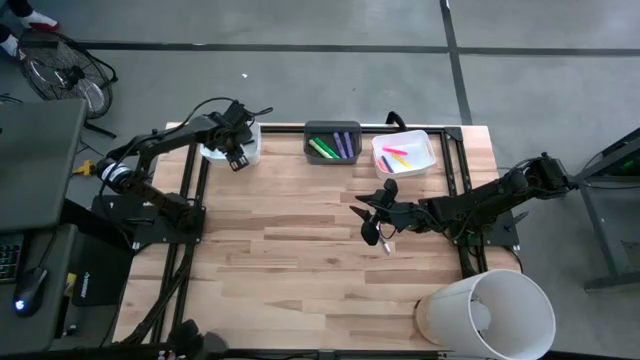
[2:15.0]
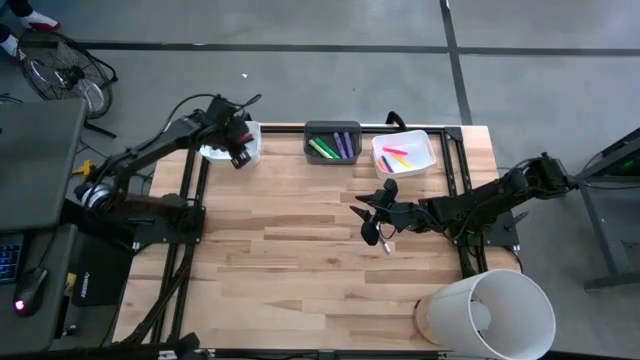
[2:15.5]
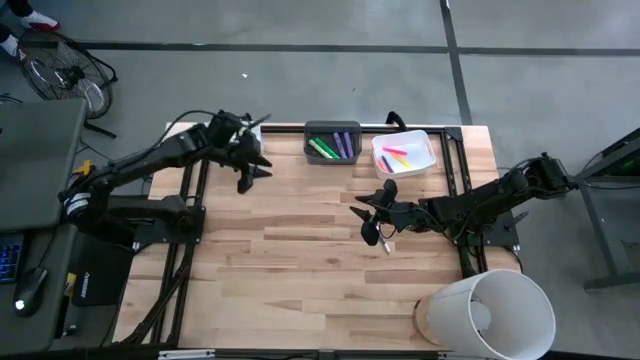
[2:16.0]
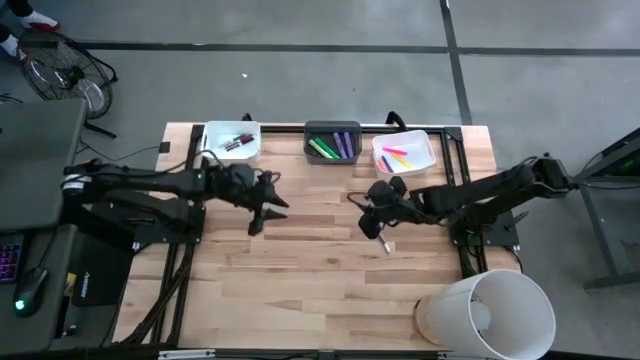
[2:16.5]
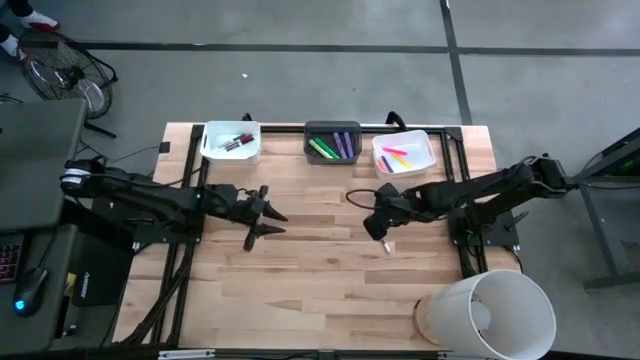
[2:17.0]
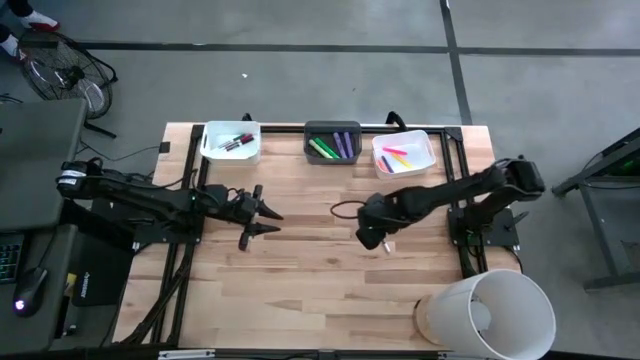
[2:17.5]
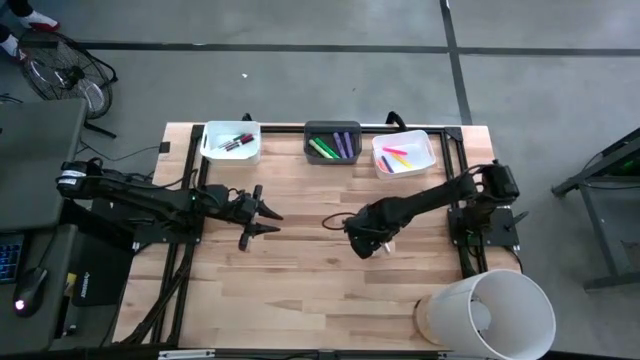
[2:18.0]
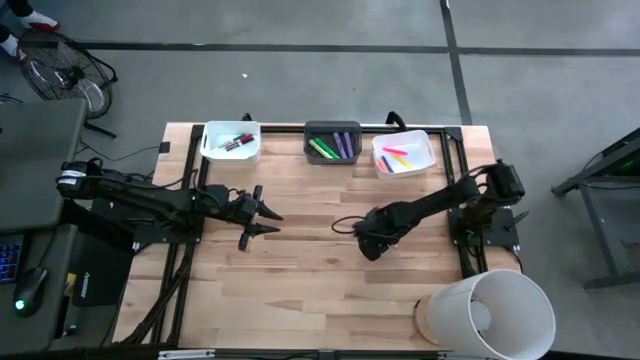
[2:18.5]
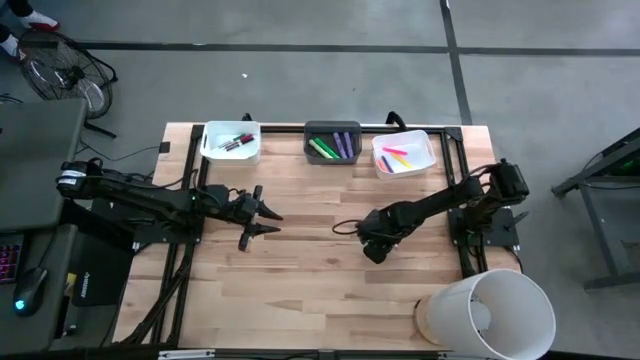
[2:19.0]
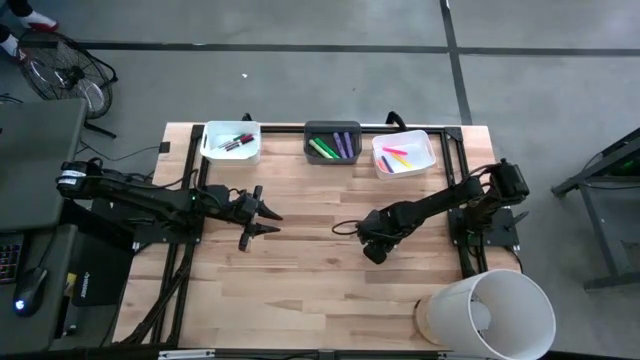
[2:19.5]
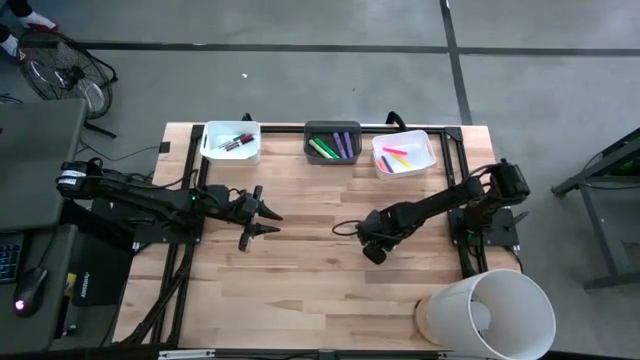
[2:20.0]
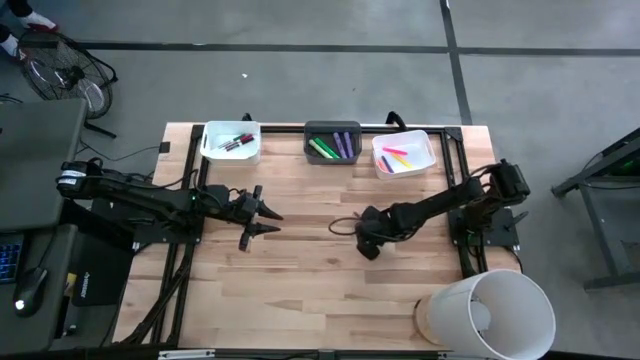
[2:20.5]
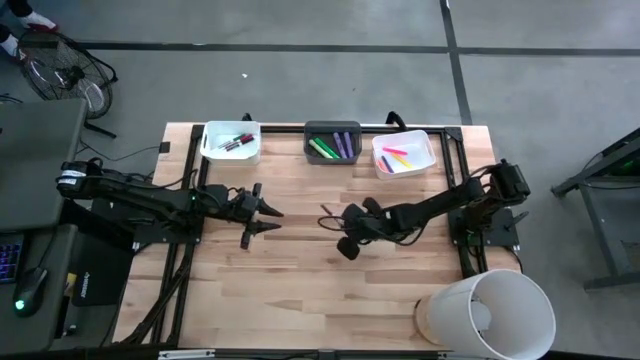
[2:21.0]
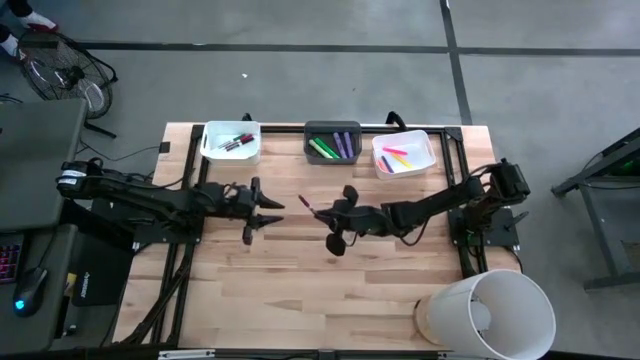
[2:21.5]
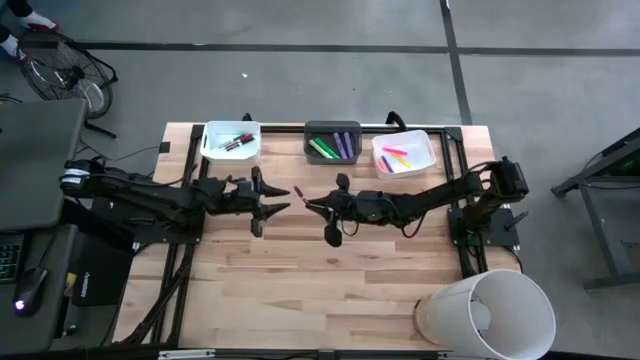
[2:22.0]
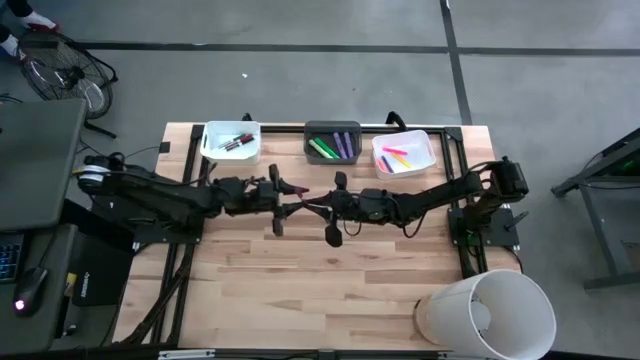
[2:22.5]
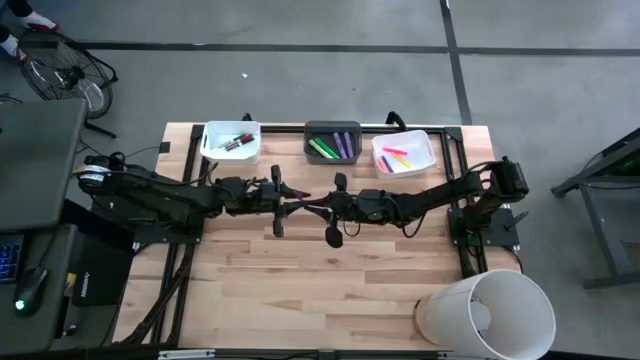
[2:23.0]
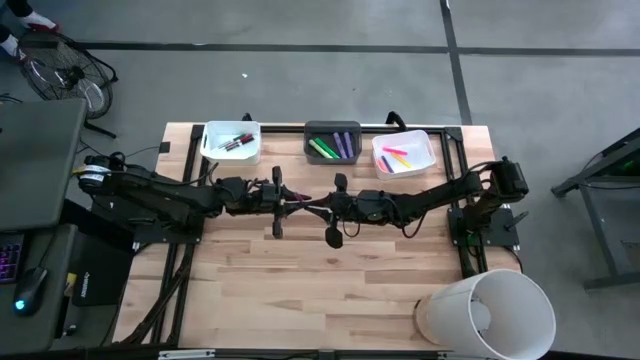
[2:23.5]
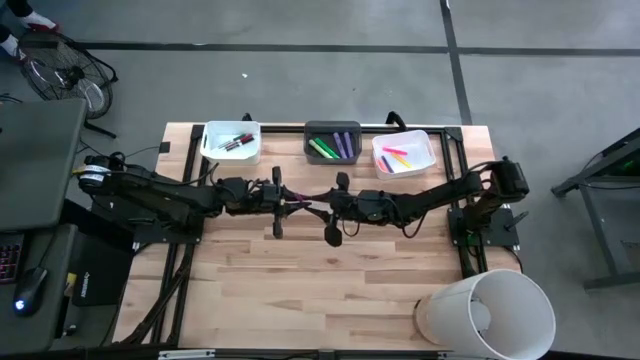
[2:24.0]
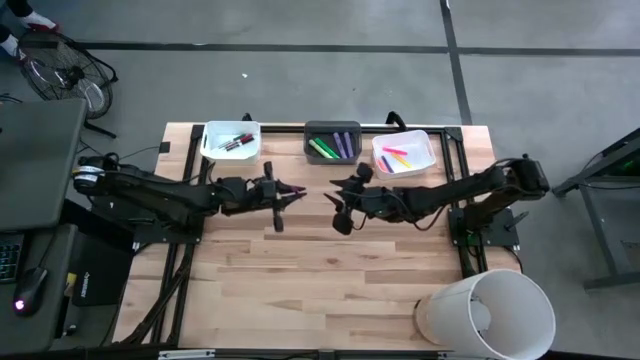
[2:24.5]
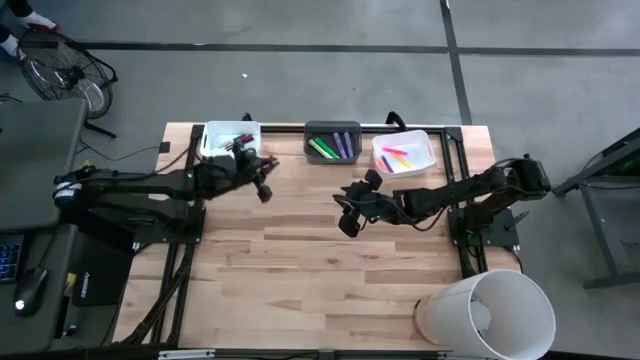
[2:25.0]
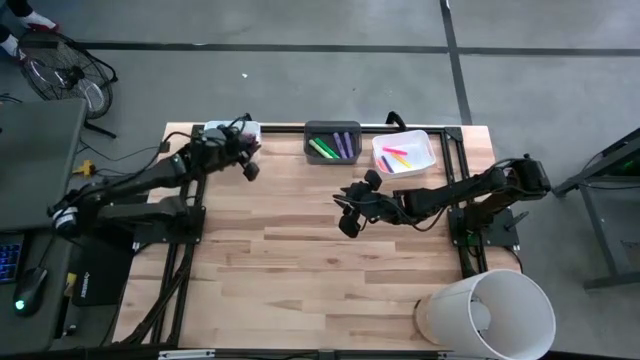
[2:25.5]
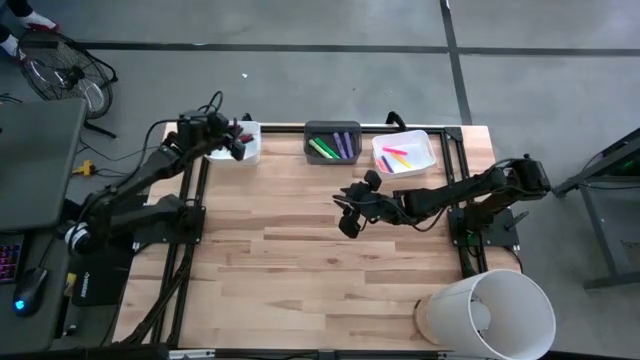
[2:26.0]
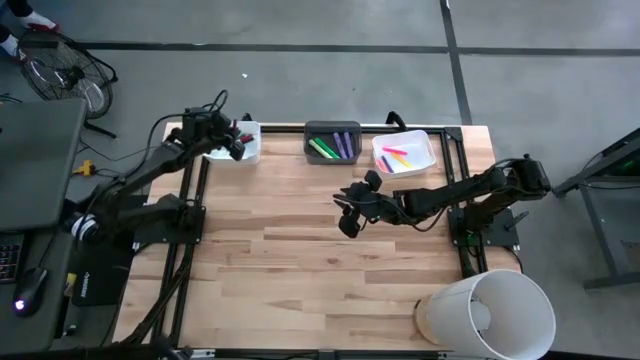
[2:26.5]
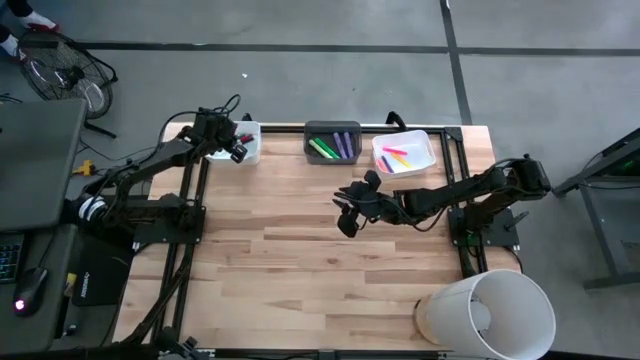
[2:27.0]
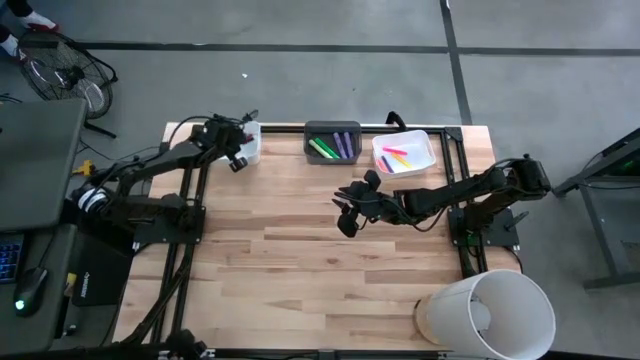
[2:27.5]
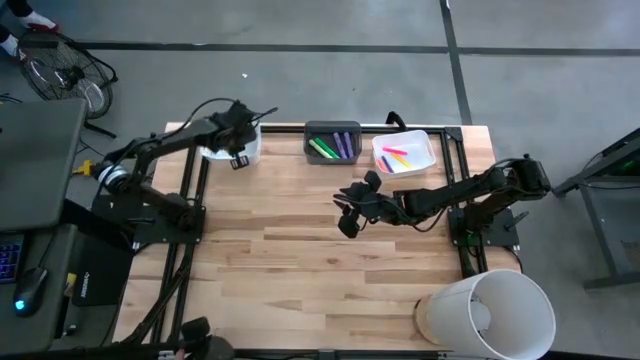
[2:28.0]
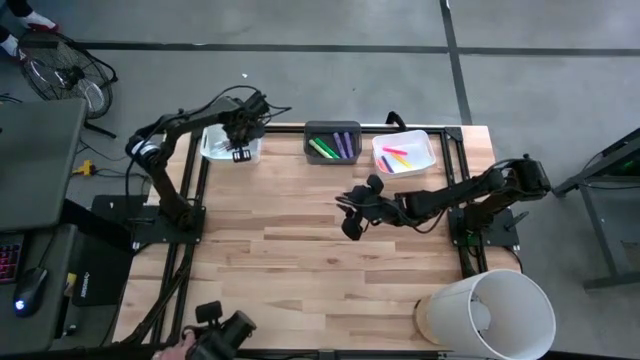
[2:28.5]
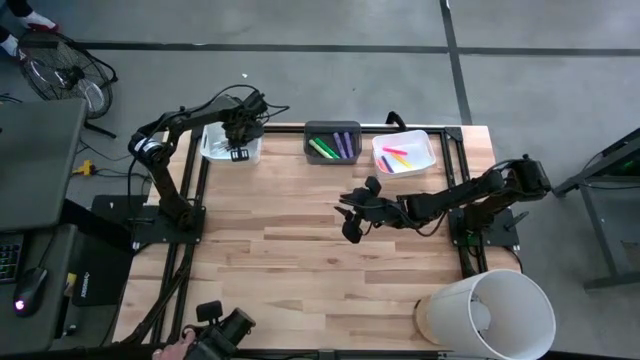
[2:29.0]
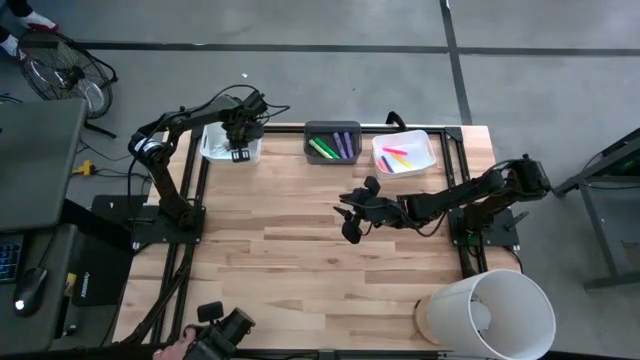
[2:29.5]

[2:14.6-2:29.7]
Task: Pick & Place Markers
Put the pink highlighter pen into the left white bin

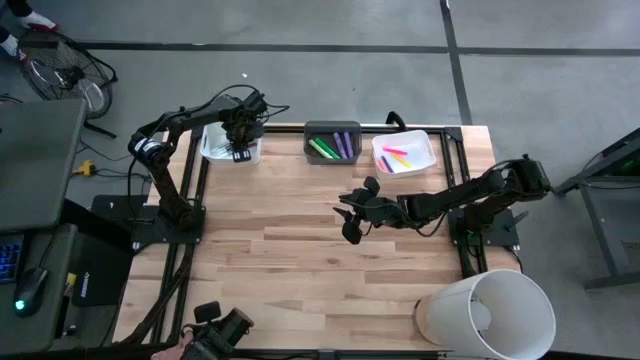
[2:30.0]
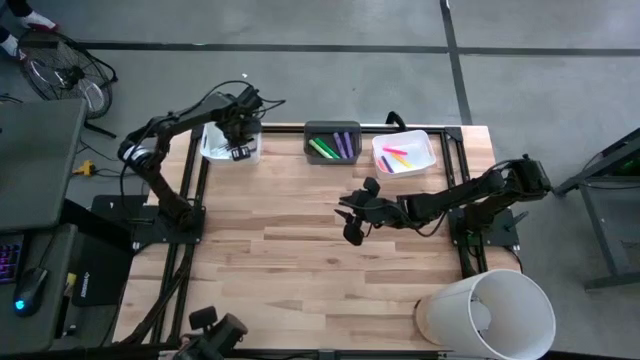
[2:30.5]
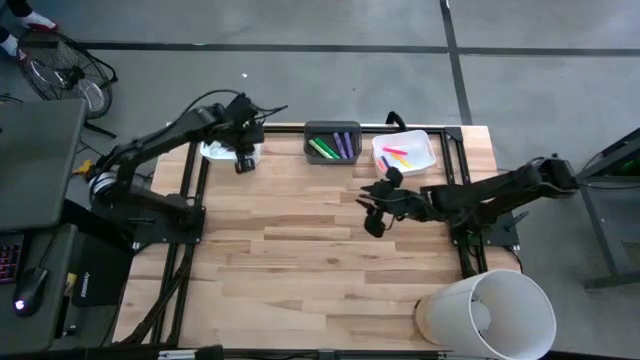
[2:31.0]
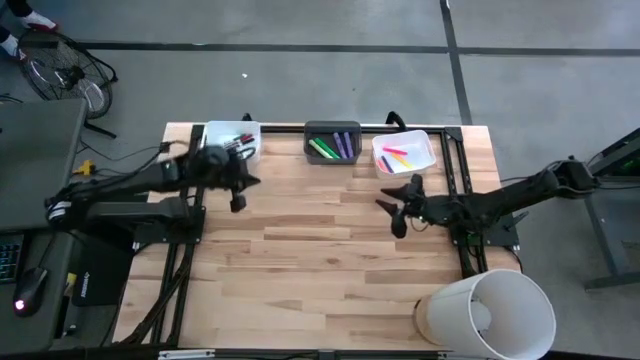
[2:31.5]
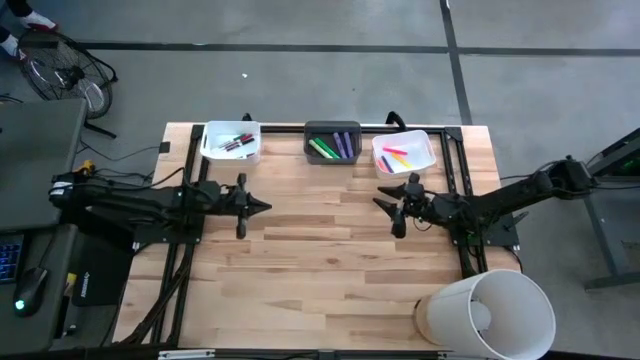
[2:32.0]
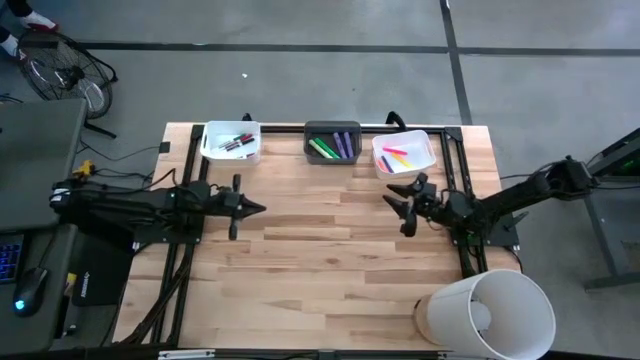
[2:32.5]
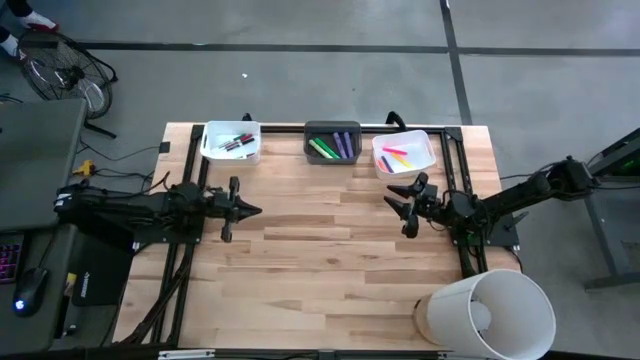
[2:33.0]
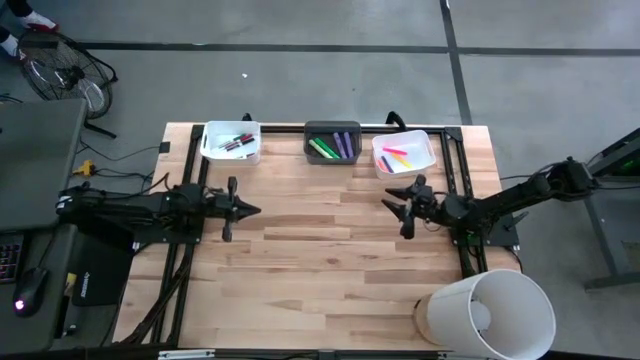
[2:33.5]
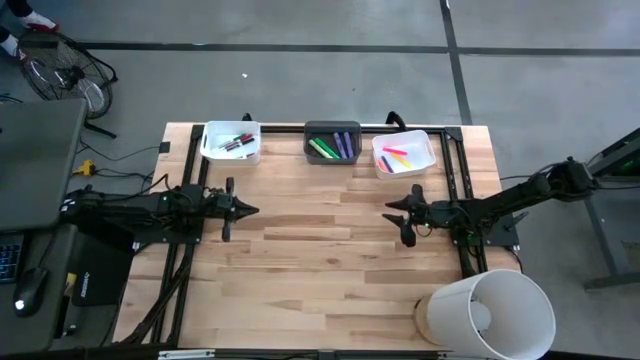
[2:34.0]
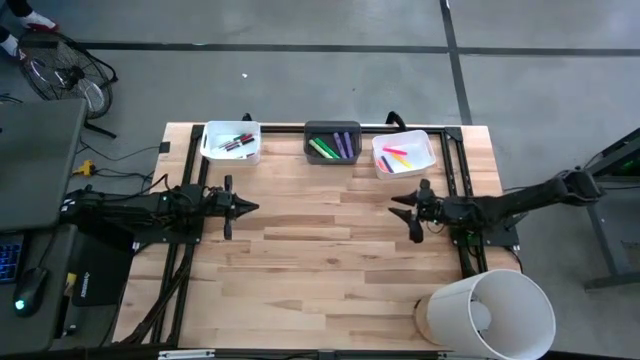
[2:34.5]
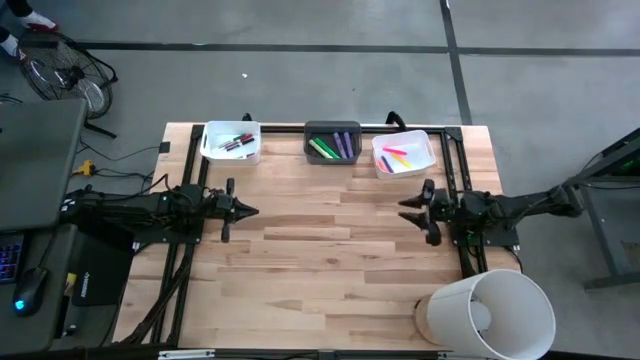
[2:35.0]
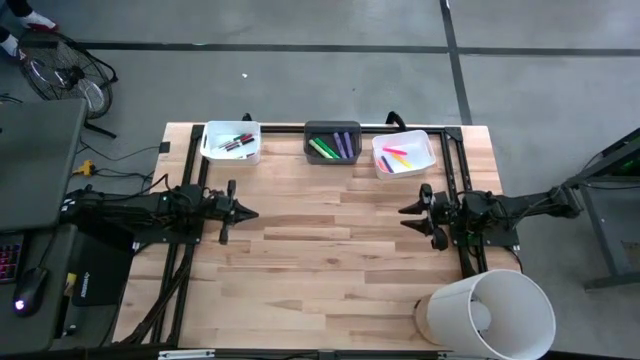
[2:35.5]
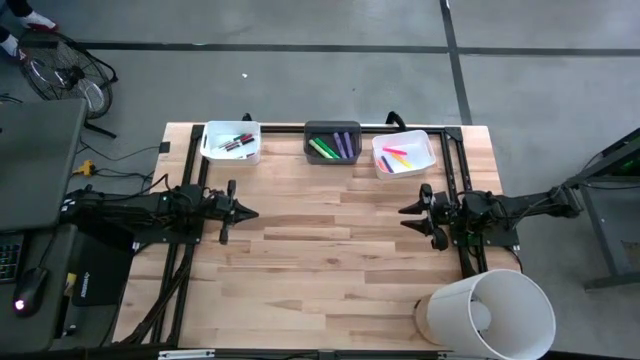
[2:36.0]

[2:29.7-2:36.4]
Return to Home Position
